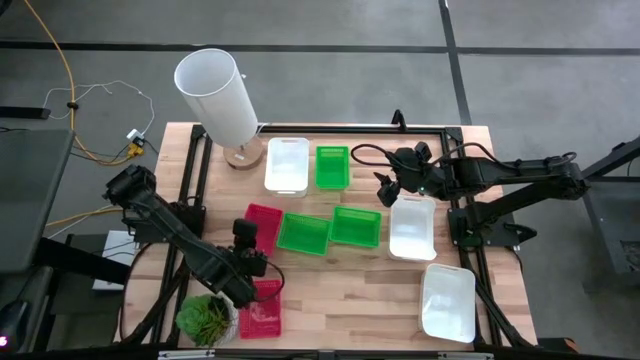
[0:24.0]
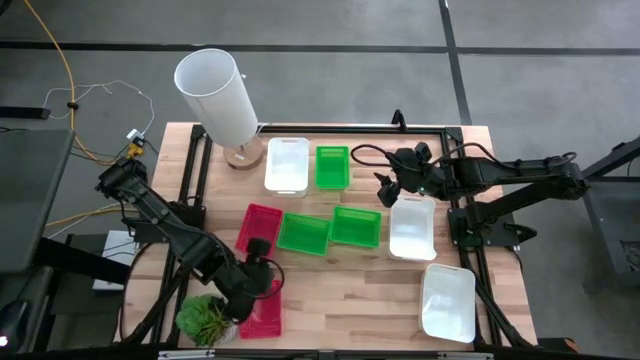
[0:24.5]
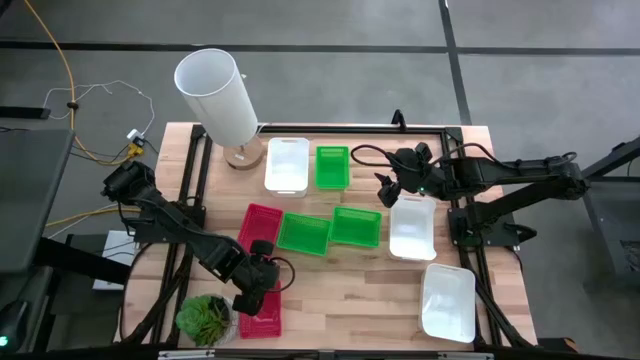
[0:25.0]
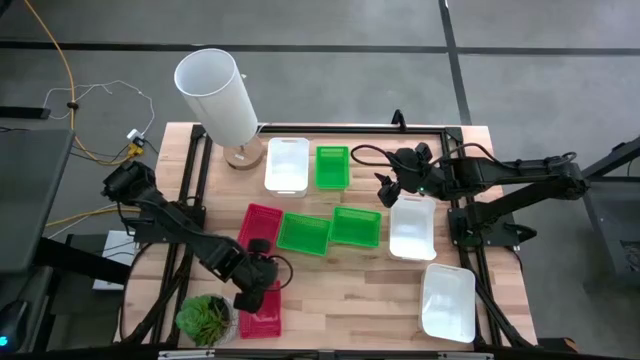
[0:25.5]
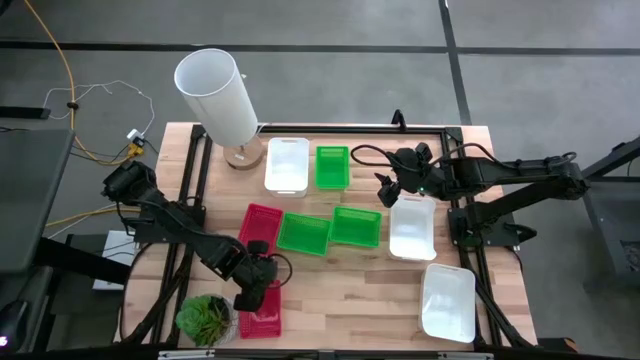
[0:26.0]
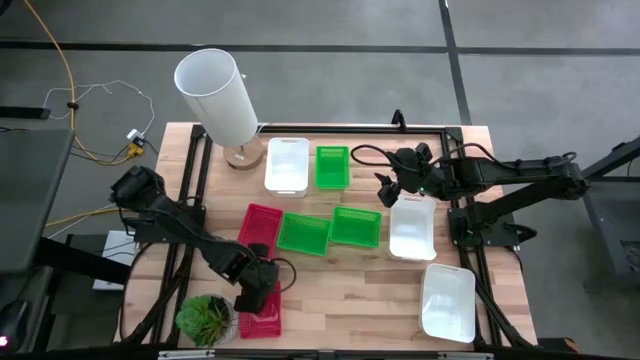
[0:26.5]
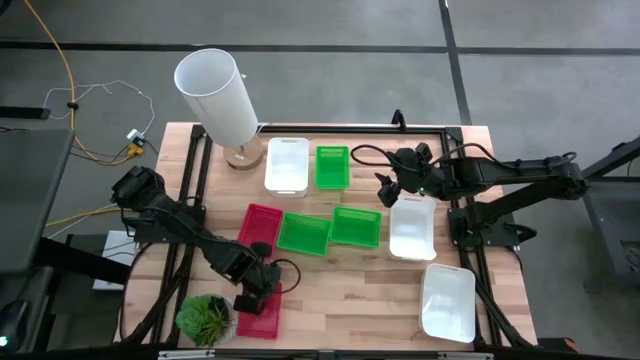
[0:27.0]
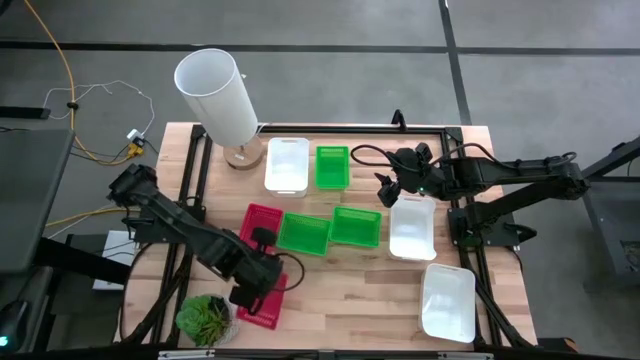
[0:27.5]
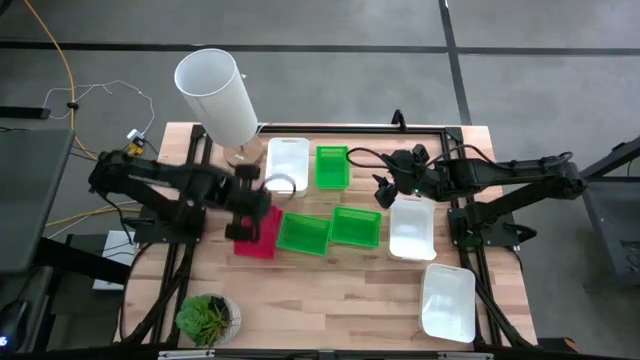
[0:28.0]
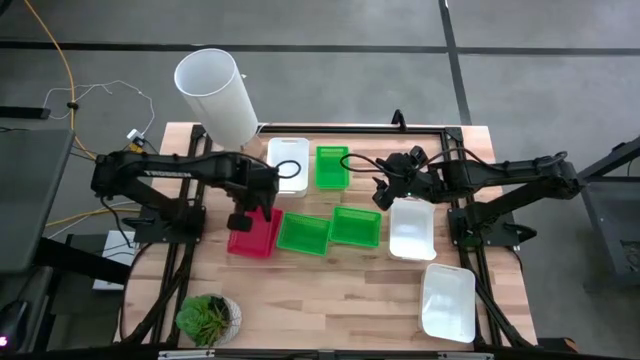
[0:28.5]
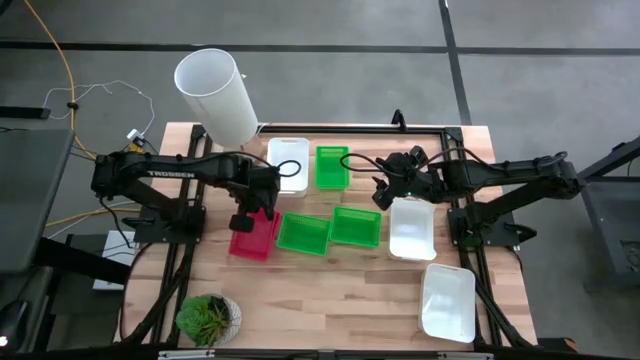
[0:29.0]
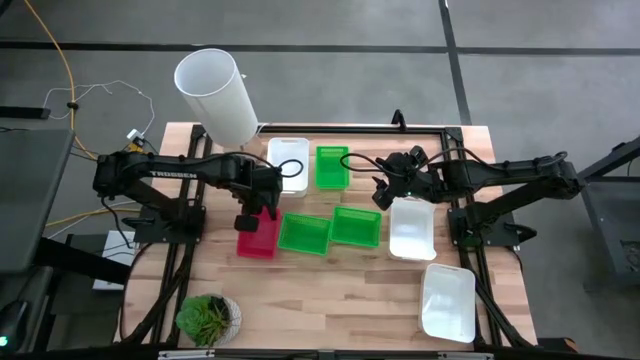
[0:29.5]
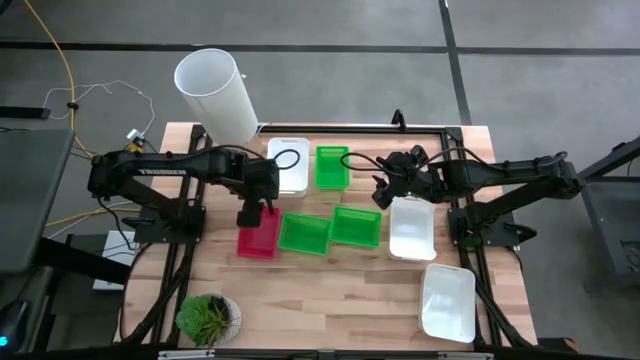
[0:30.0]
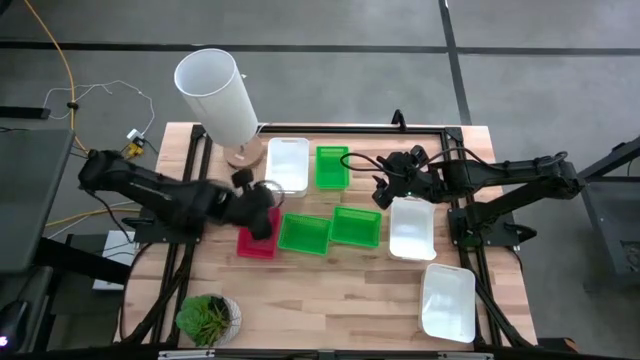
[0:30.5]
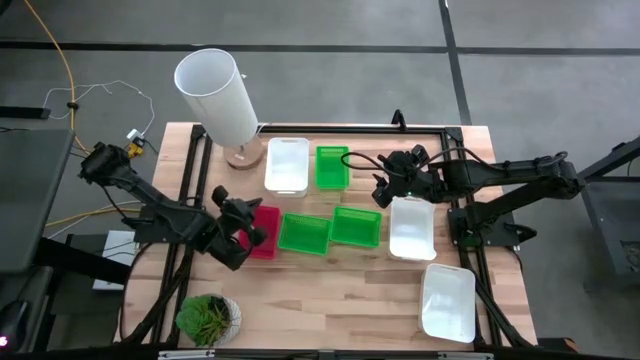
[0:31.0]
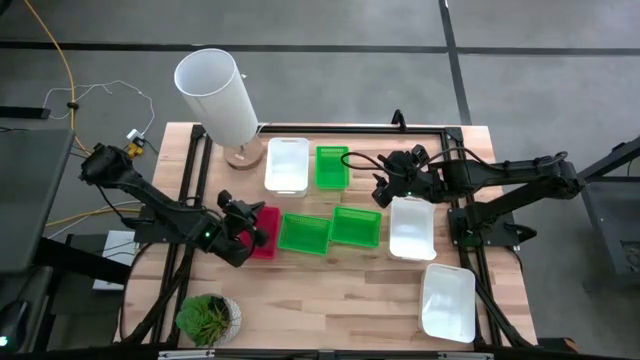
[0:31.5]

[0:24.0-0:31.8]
Stack the bottom red bin on top of the top red bin

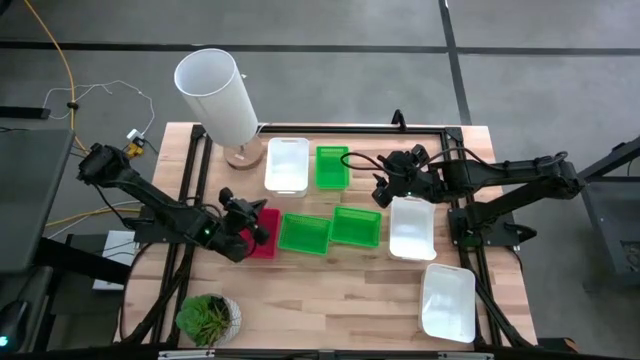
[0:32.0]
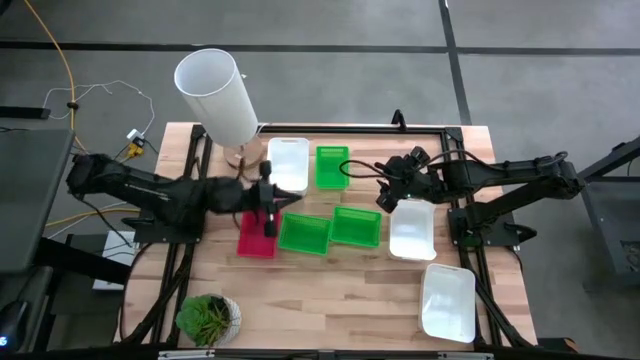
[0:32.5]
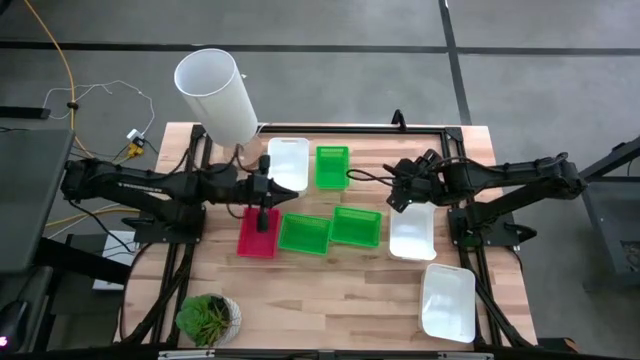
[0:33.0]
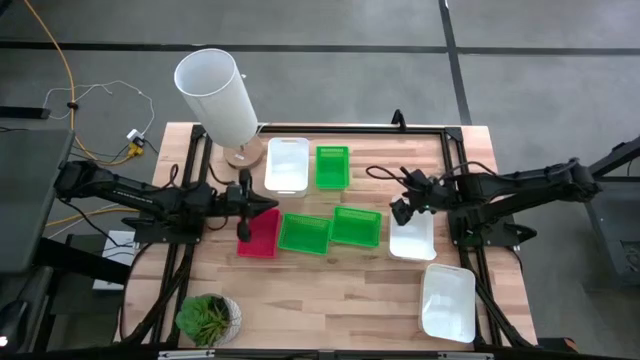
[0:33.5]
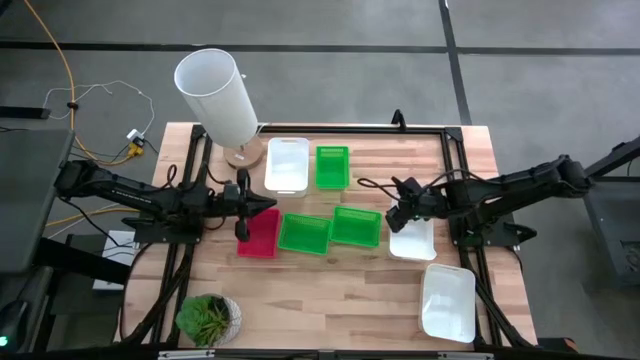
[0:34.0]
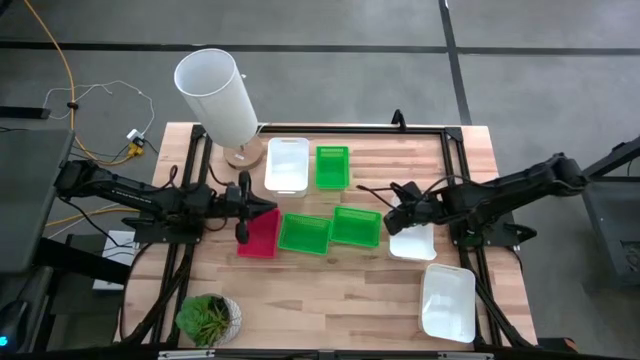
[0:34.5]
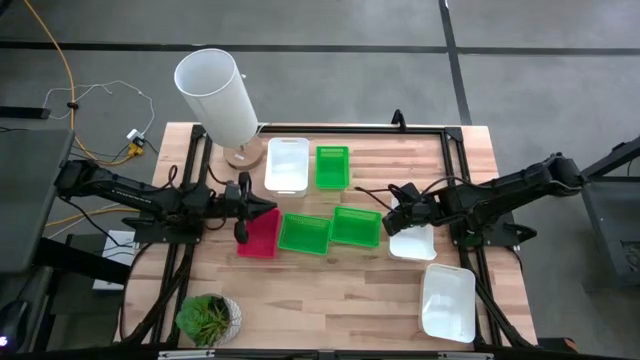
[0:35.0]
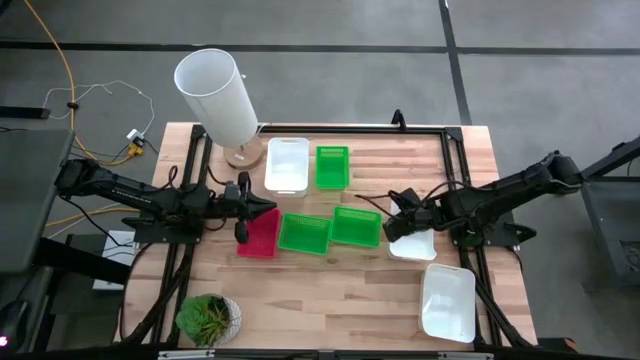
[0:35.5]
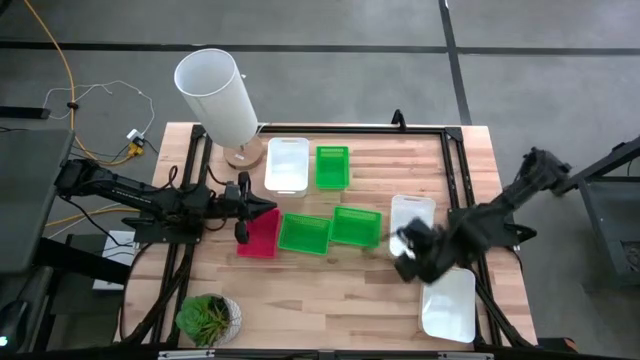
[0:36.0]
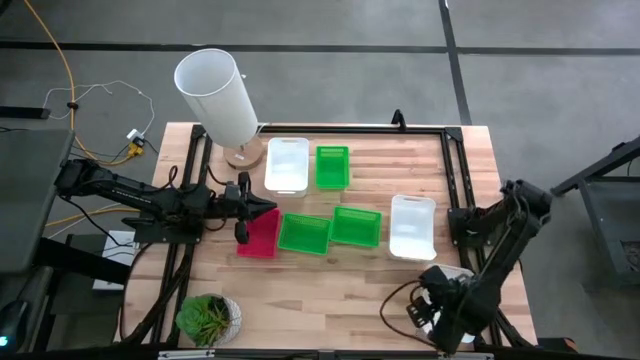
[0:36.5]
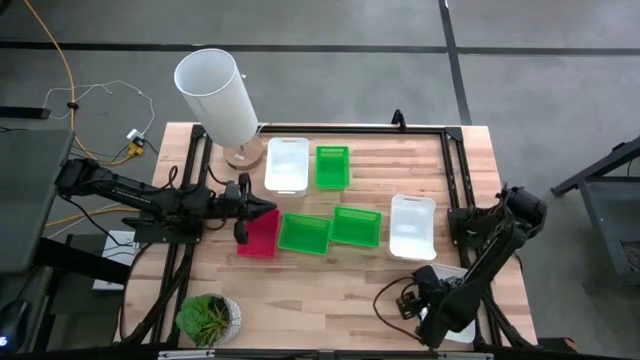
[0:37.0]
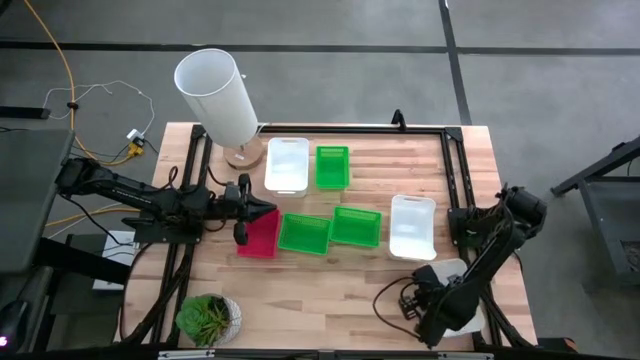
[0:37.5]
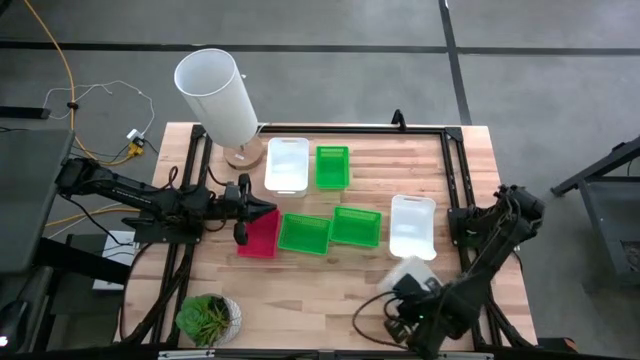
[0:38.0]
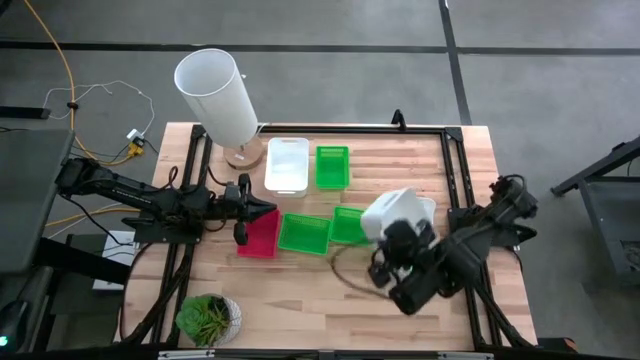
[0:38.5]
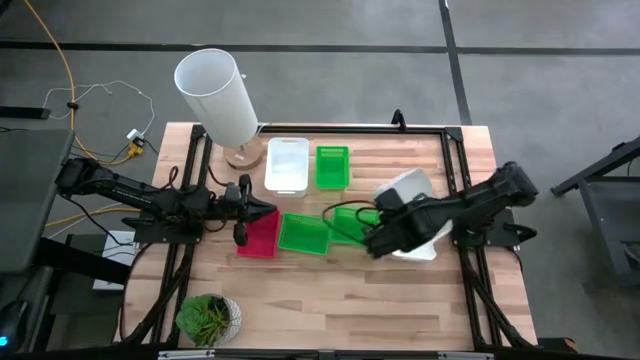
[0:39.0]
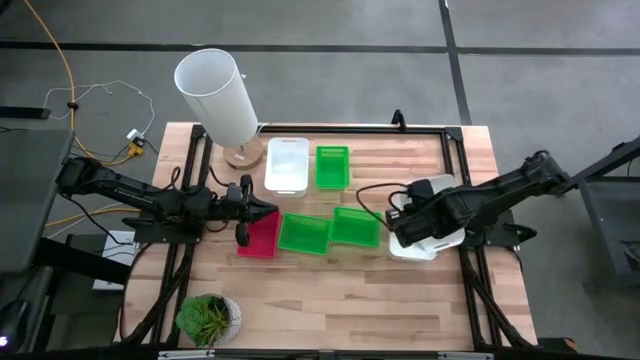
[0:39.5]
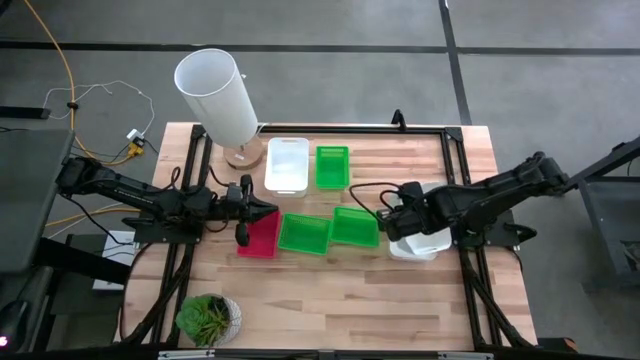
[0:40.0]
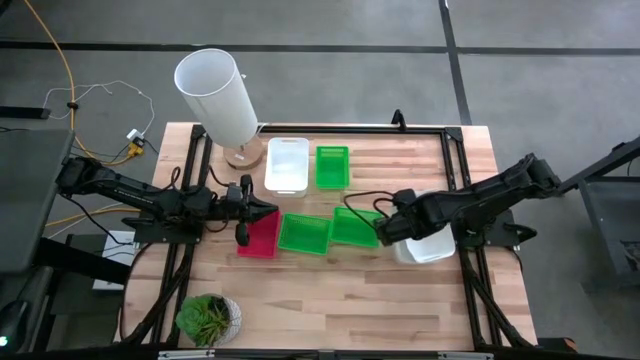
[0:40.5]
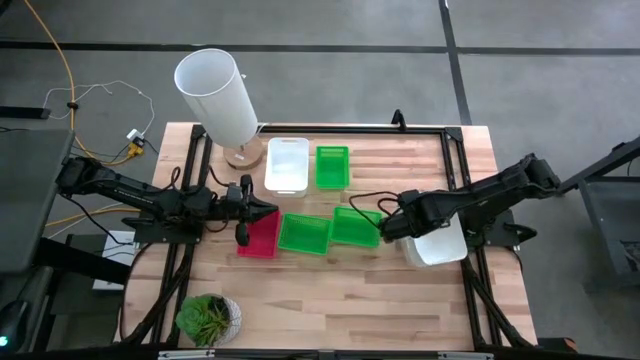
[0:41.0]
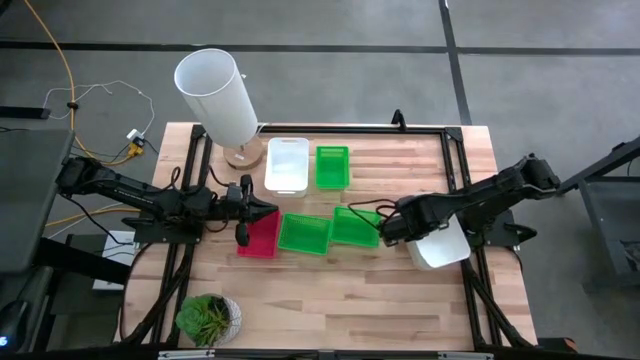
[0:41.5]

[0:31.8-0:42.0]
Stack the bottom white bin on top of the middle white bin

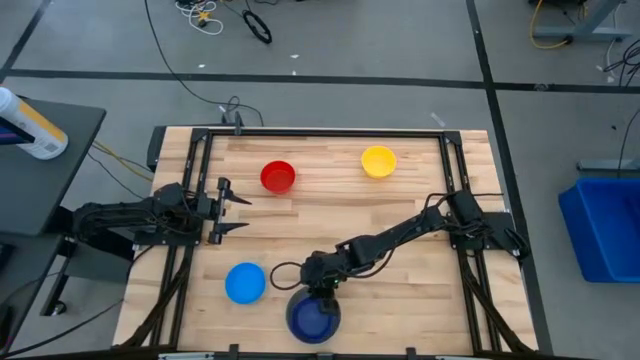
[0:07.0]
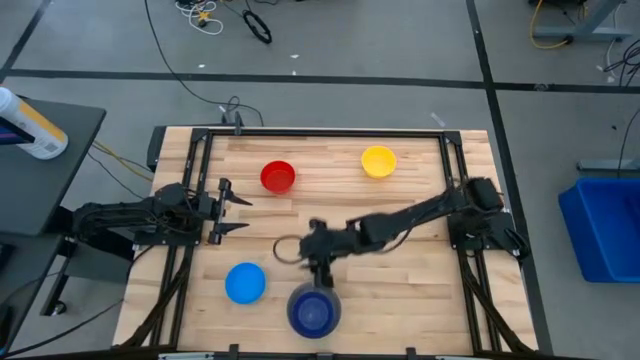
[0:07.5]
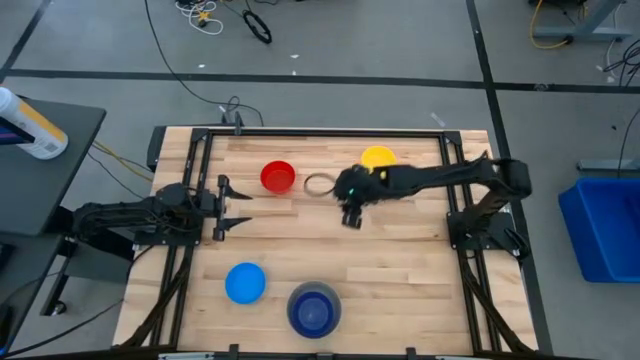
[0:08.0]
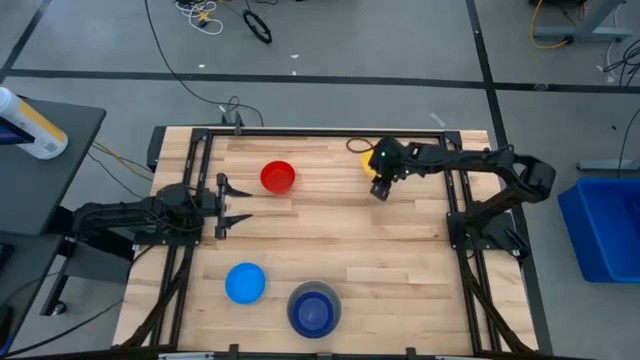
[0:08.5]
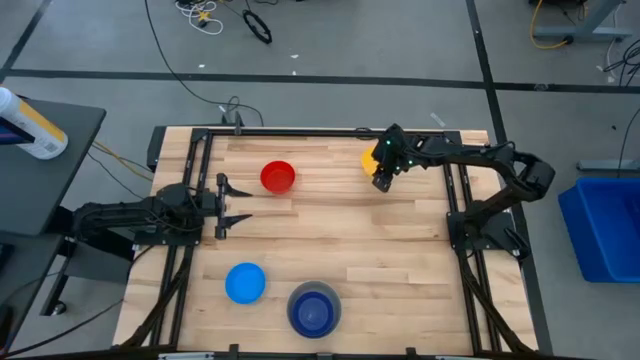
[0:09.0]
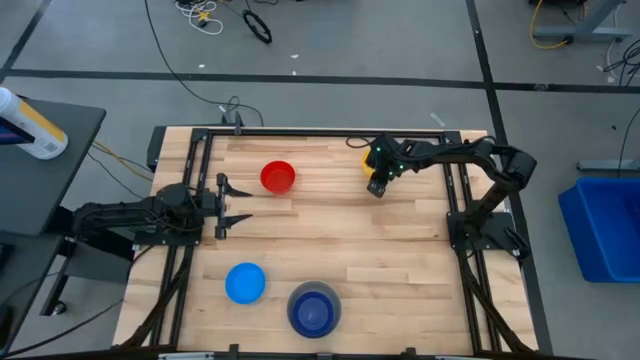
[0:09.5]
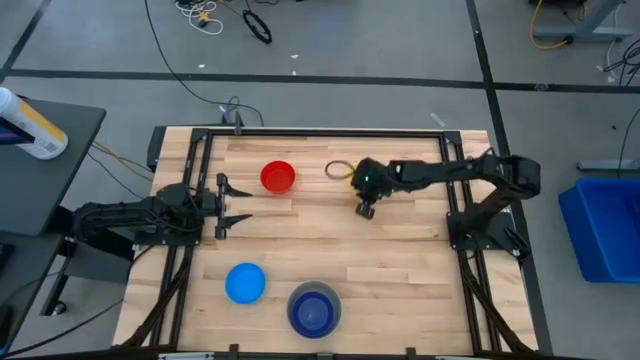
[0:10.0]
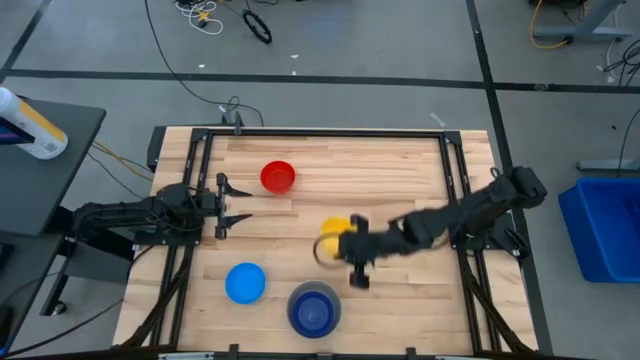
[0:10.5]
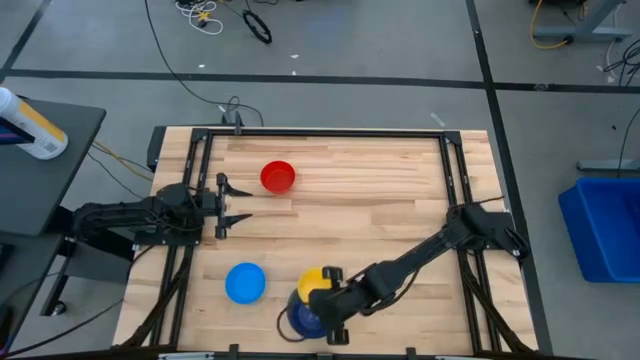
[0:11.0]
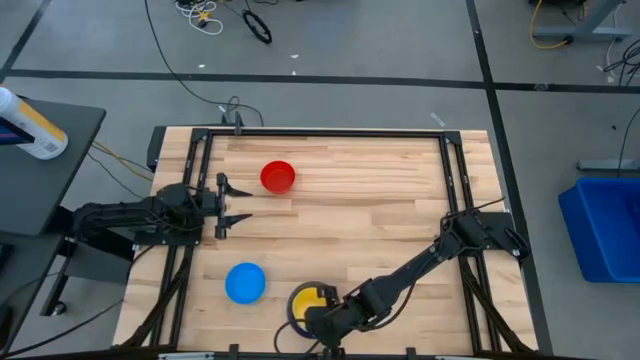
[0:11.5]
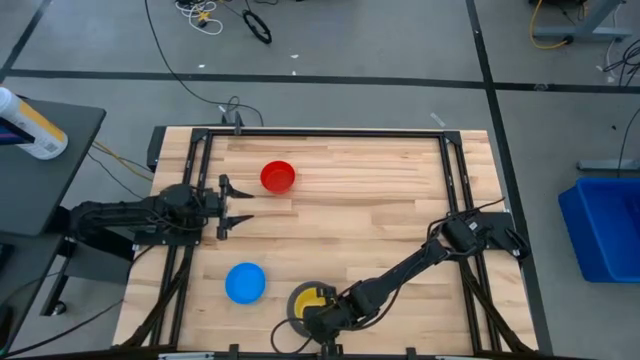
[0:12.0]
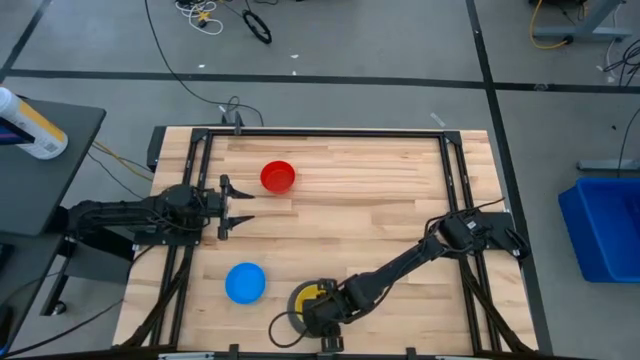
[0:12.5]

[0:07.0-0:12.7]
Stack the yellow bowl on top of the dark blue bowl
